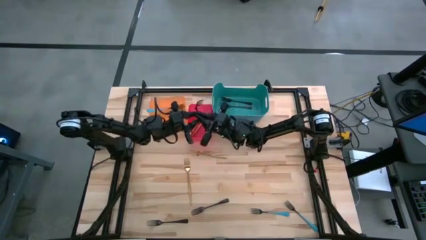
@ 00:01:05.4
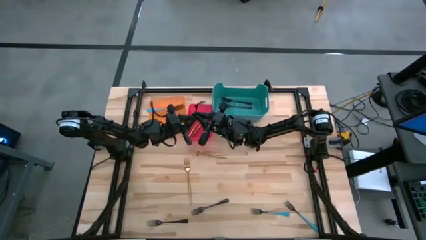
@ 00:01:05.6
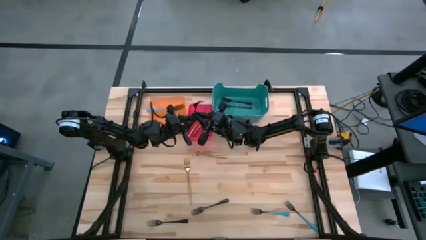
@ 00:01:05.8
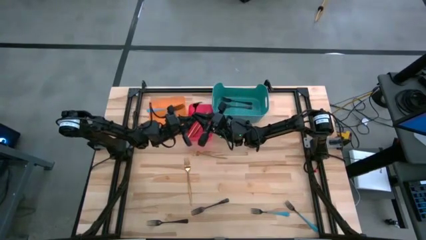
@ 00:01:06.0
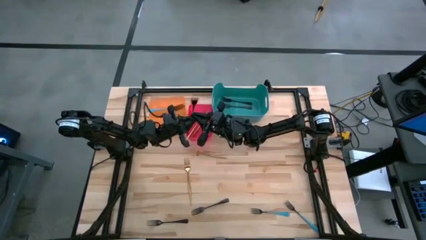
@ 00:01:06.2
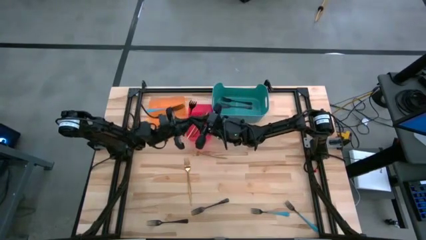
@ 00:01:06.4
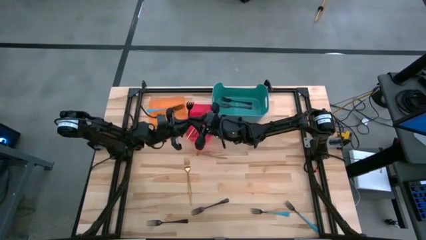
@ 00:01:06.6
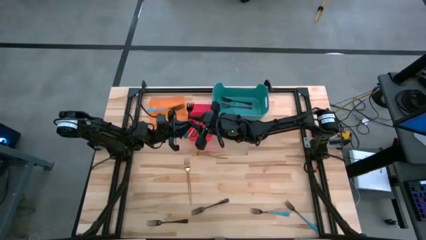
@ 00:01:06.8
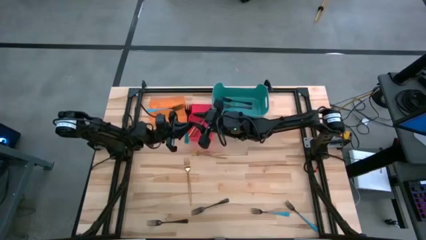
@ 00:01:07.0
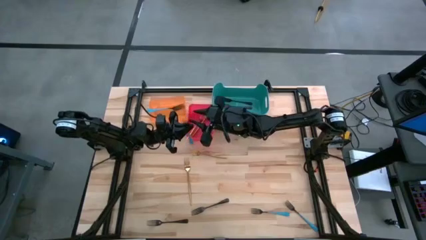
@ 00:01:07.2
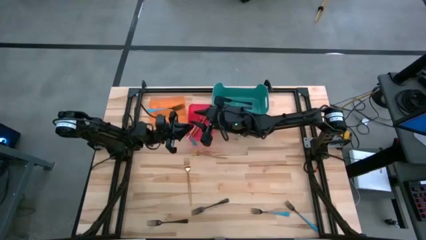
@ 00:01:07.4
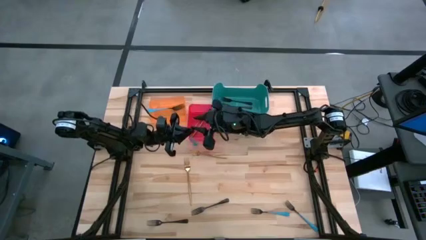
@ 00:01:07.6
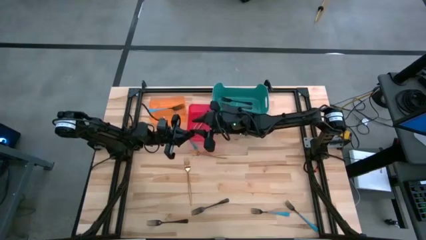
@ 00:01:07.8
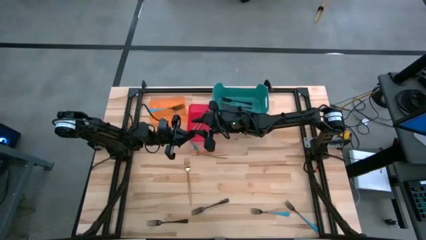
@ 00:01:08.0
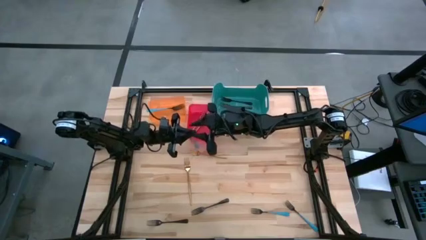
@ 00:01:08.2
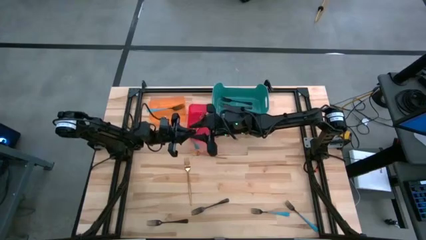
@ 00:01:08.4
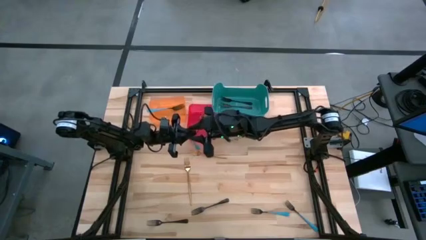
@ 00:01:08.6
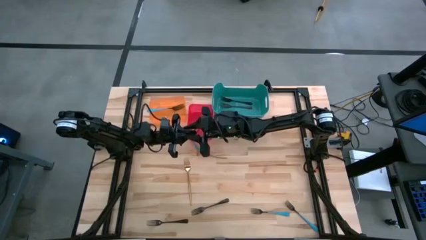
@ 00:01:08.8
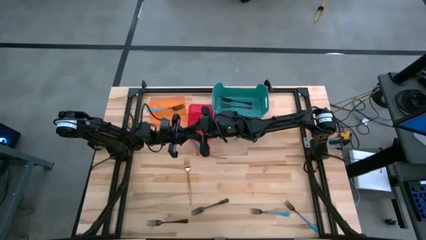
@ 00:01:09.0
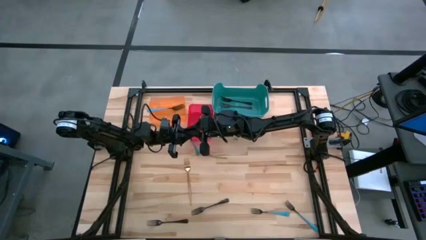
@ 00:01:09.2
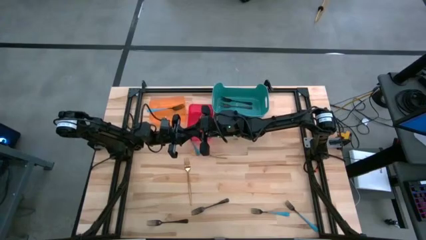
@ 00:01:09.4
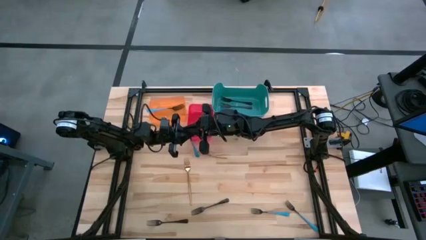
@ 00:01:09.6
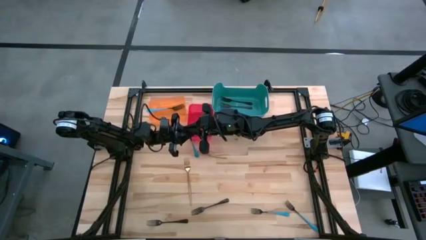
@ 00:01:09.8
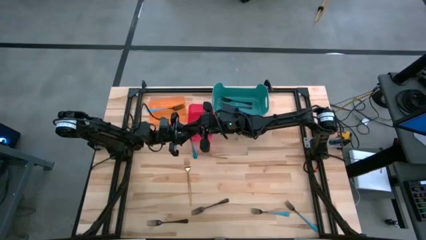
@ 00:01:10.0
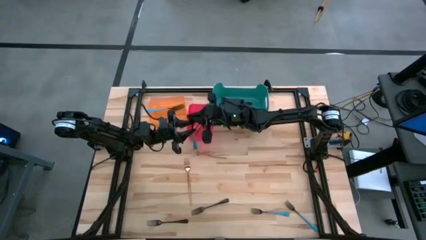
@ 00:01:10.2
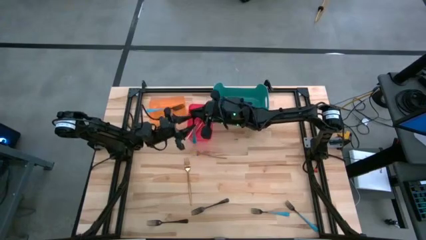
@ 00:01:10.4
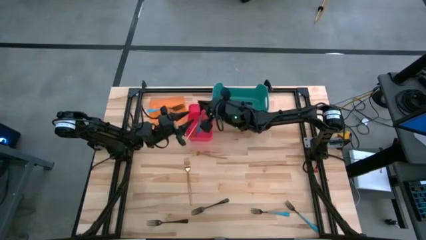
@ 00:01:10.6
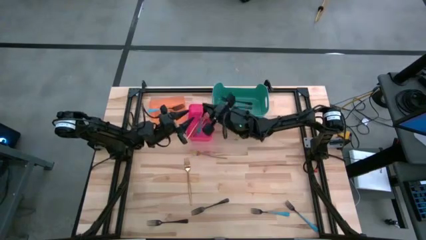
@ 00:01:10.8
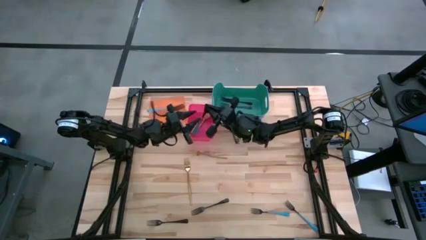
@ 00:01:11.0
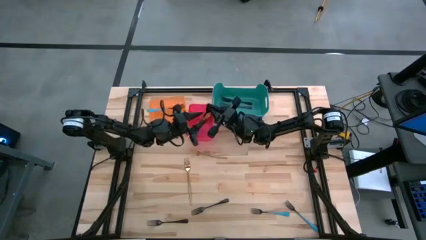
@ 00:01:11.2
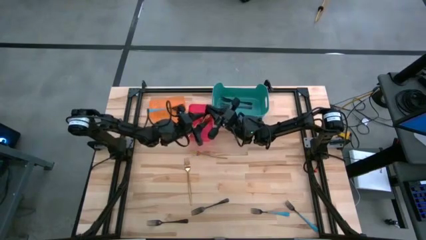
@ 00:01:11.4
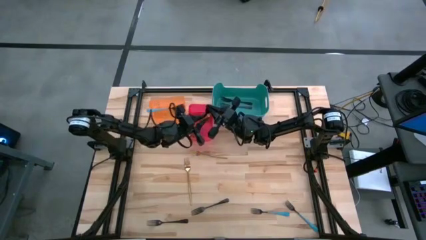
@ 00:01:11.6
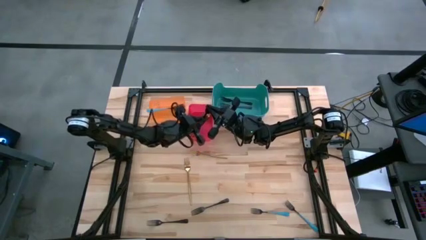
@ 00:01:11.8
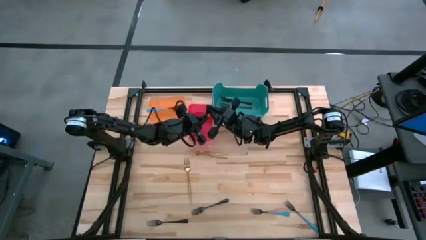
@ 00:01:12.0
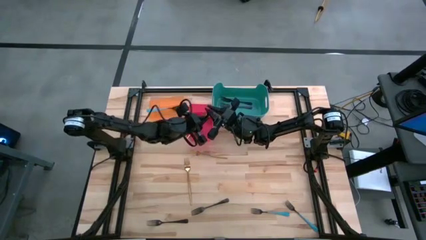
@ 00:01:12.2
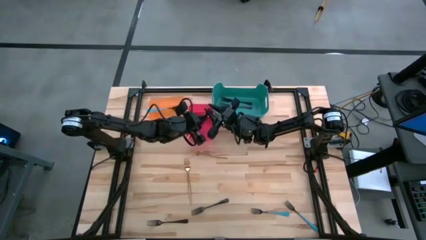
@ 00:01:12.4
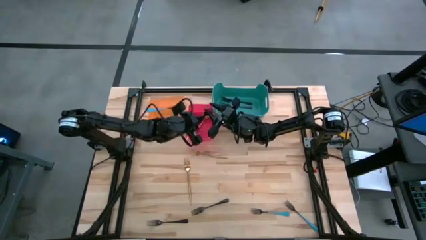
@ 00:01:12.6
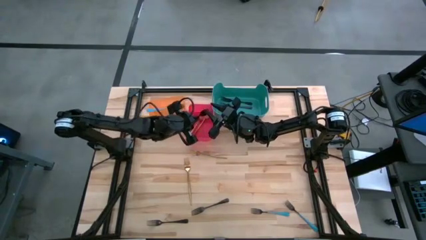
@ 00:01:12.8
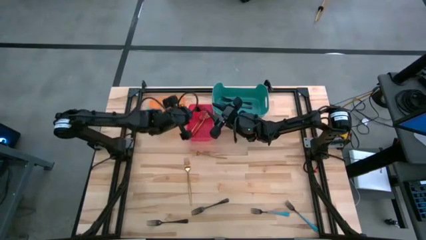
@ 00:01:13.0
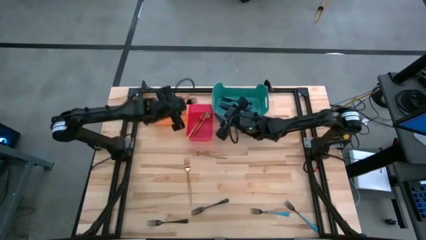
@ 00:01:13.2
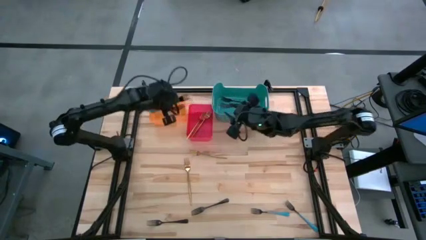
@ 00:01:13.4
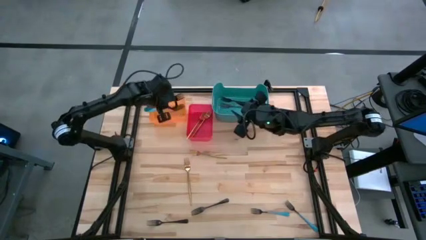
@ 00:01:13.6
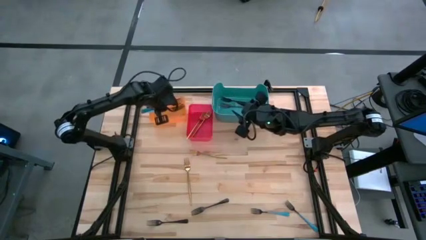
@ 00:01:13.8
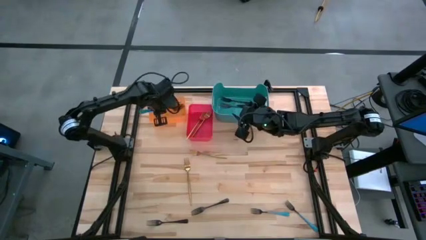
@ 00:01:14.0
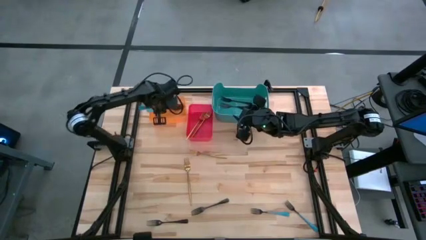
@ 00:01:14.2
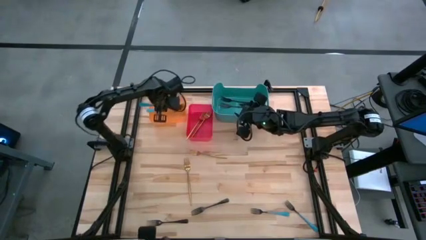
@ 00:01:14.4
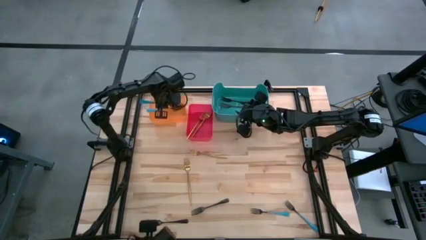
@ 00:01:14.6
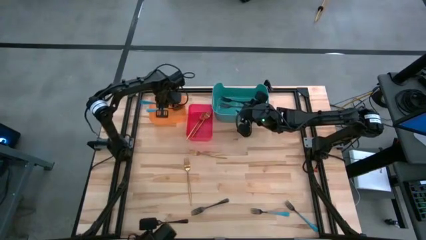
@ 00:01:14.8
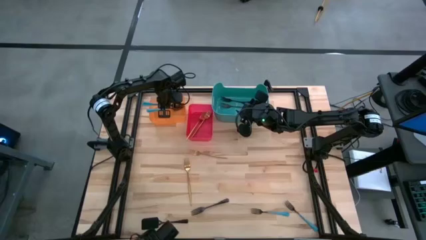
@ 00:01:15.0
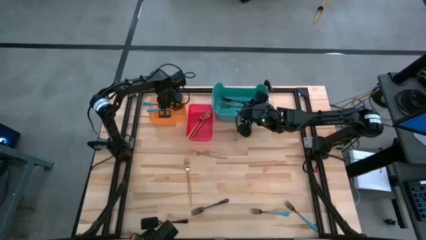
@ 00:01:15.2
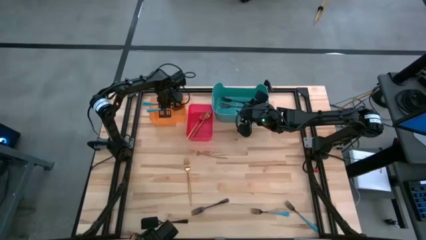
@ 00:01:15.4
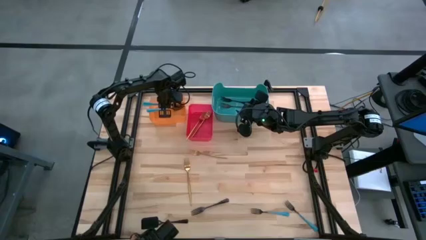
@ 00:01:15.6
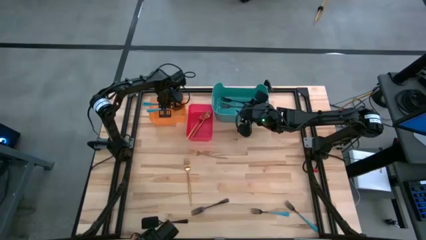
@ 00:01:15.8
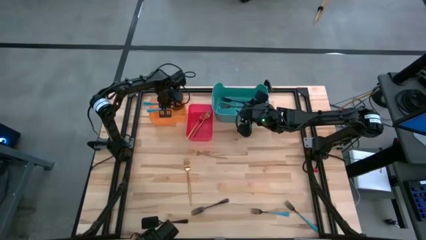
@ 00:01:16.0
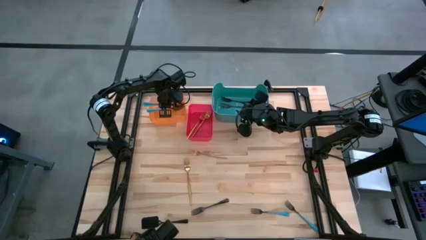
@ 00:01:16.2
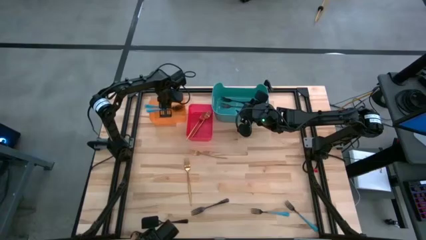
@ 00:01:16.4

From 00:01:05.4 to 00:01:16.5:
Task: Sort silverware by color (type)
Put the blue fork into the orange bin
